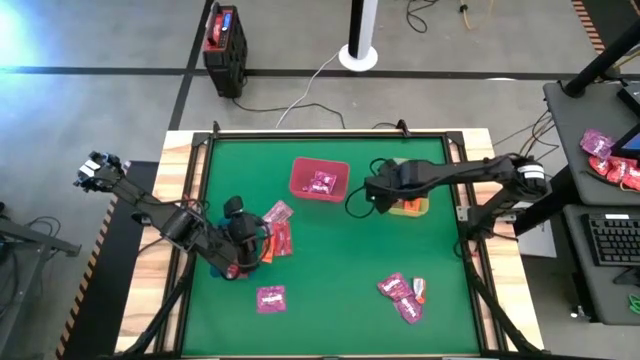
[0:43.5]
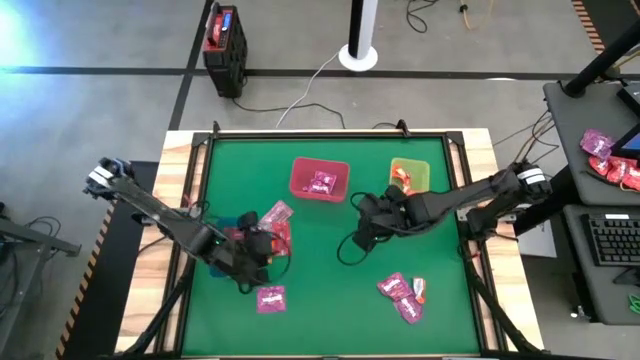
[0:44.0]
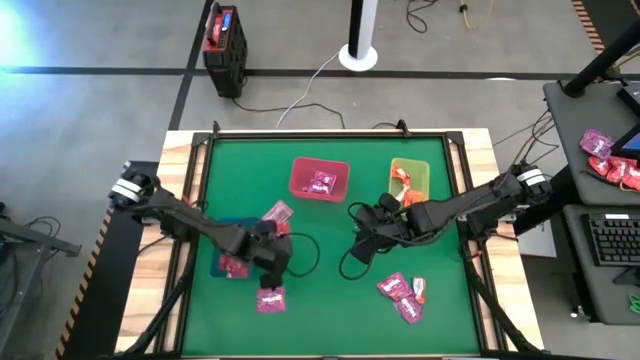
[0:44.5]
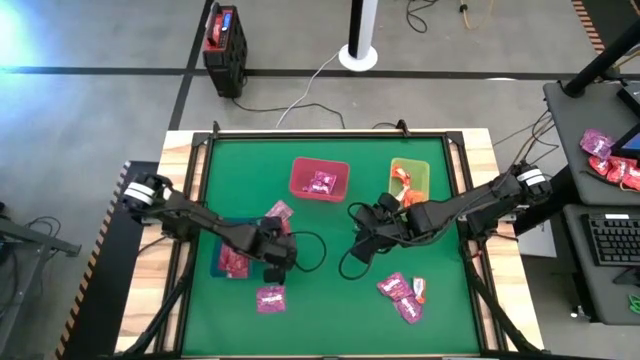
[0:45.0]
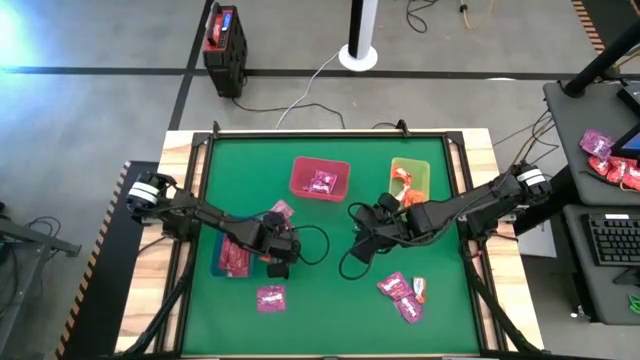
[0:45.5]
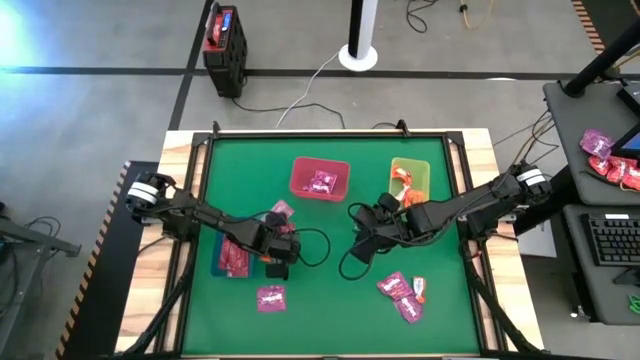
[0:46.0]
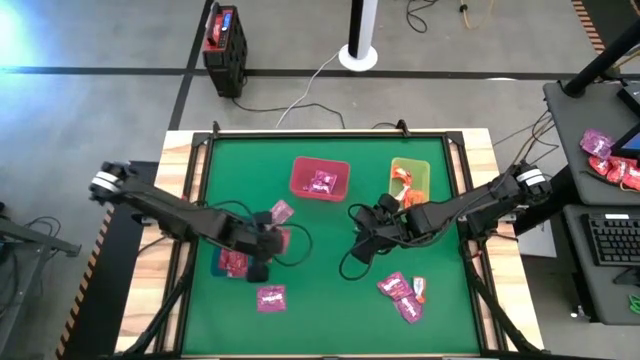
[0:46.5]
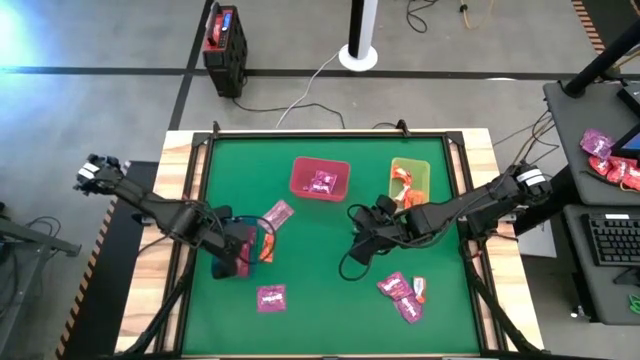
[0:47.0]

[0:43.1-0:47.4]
Task: Sort candy by brand, put in halloween buckets
Put the red candy into the blue bin

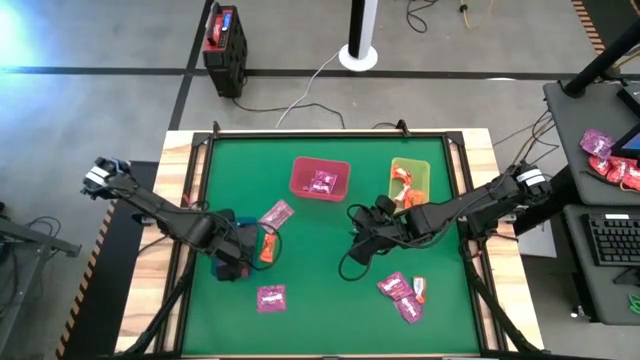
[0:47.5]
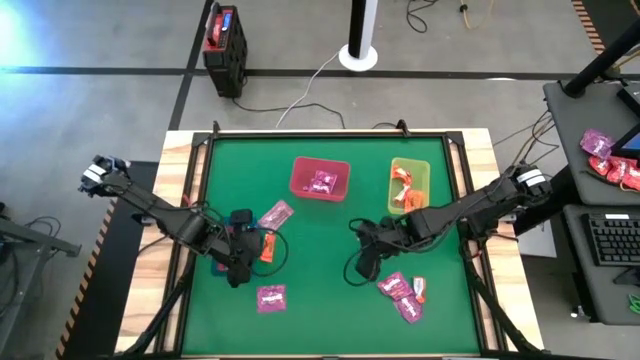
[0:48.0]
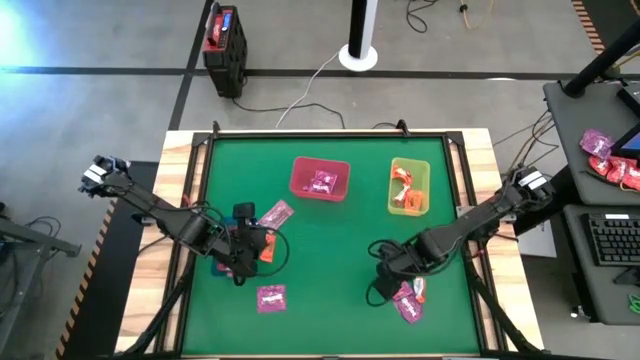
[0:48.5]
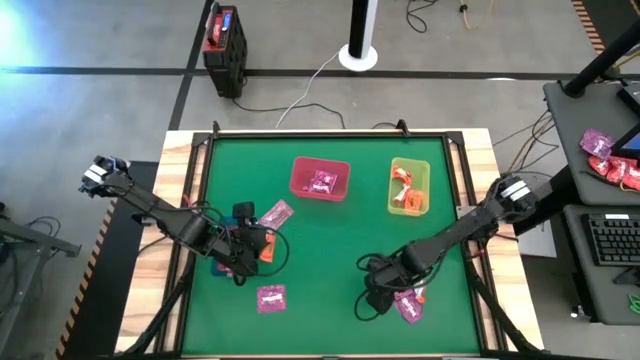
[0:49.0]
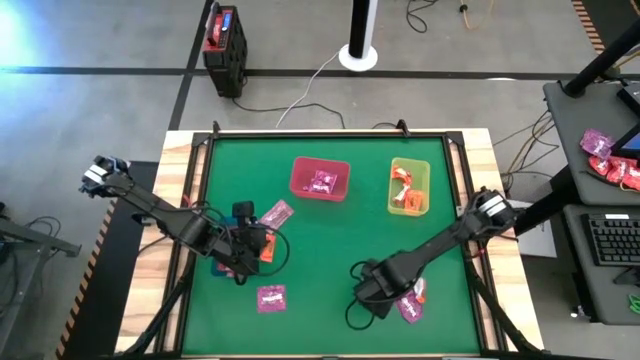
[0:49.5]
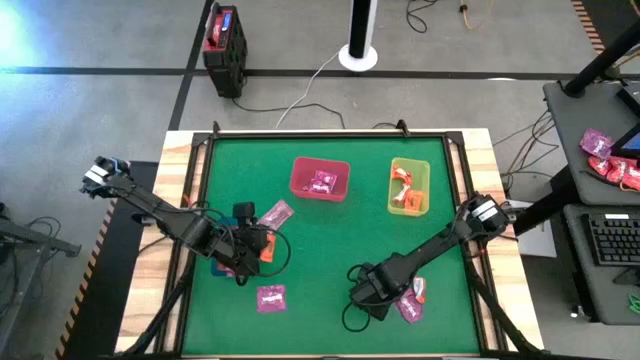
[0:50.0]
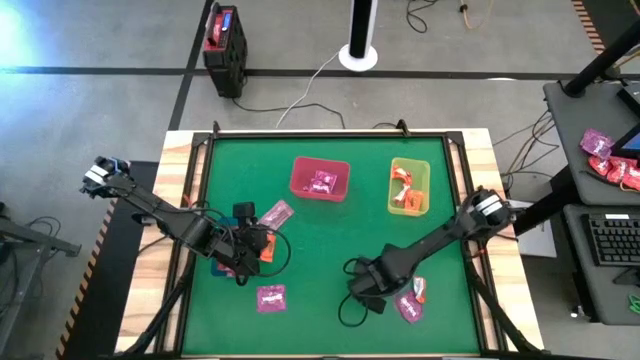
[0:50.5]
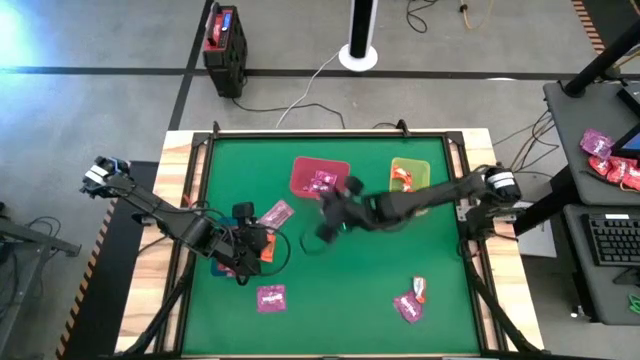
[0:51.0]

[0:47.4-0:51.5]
Put the violet candy into the red bin

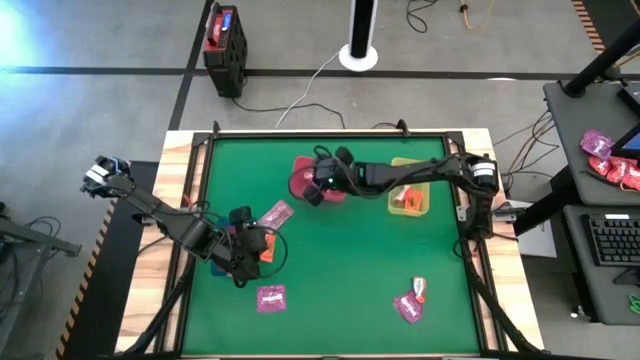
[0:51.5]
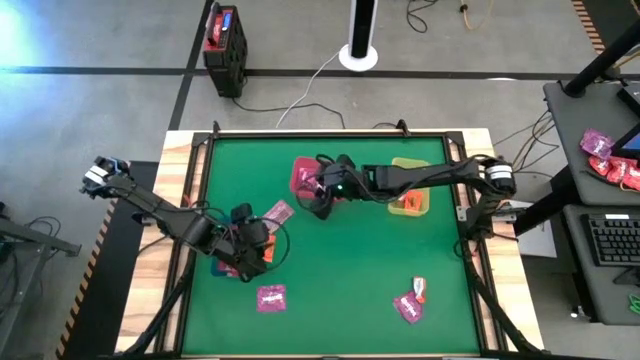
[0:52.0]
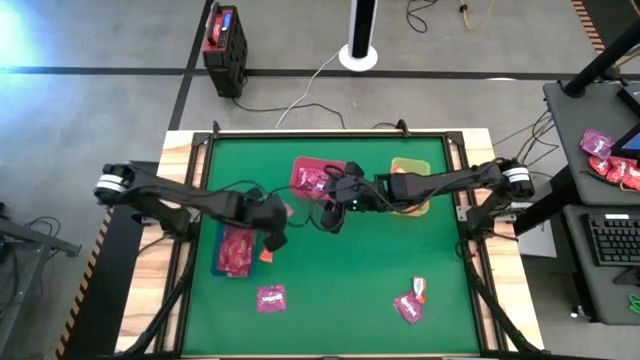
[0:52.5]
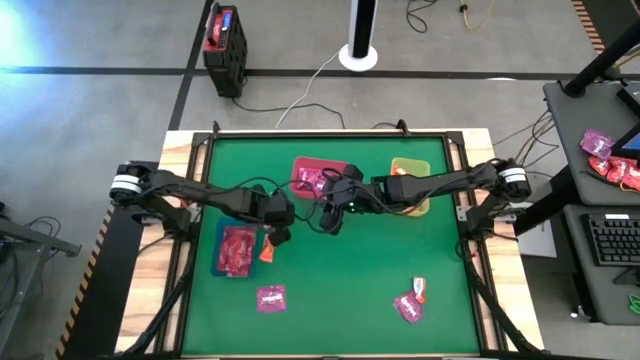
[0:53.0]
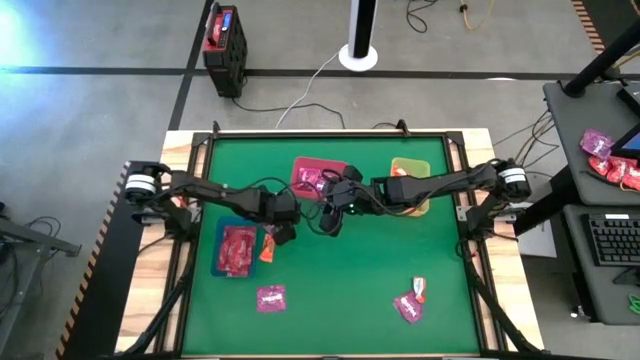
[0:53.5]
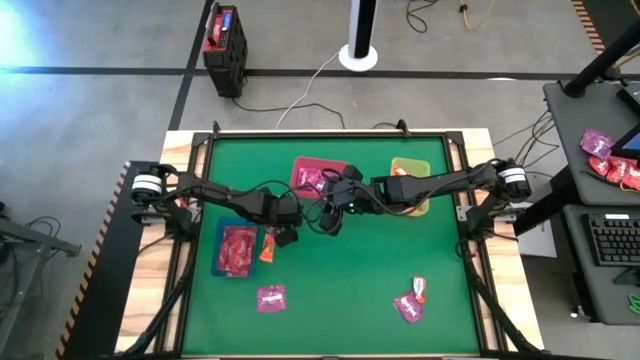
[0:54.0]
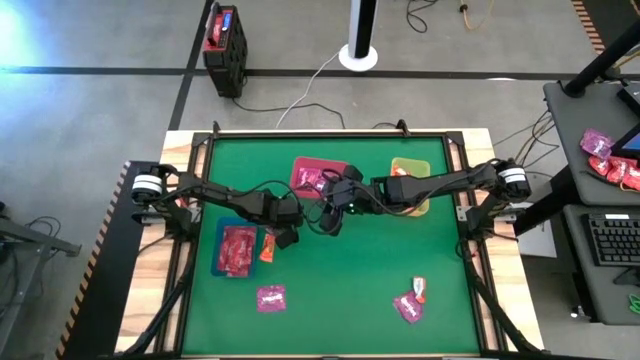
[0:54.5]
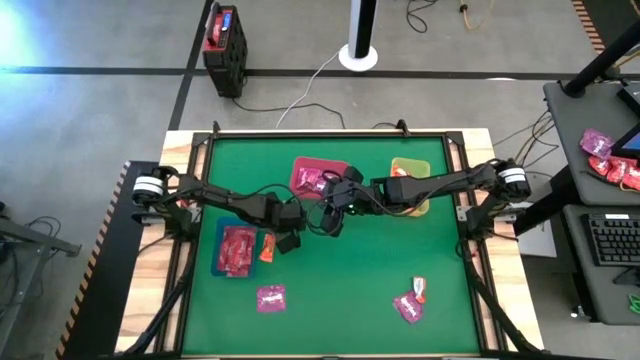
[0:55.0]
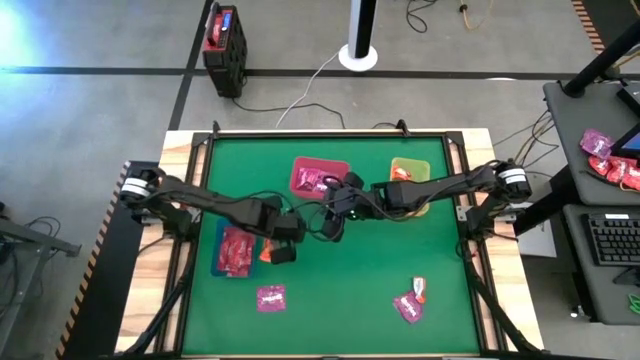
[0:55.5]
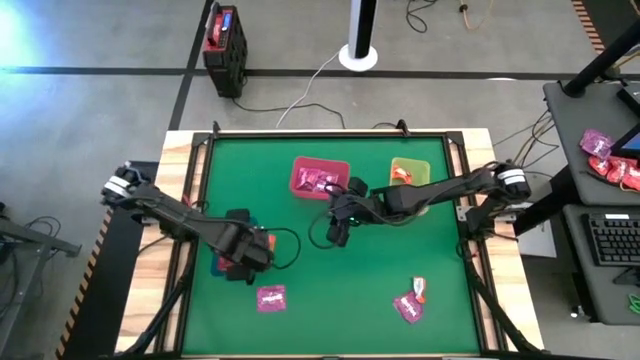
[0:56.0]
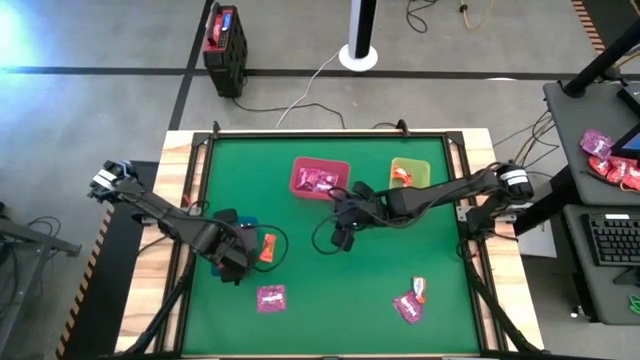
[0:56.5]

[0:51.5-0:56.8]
Put the red candy into the blue bin

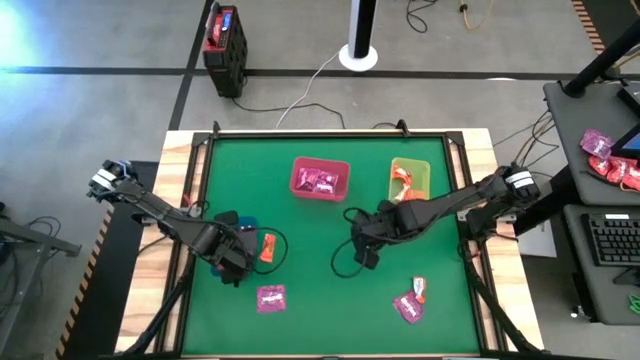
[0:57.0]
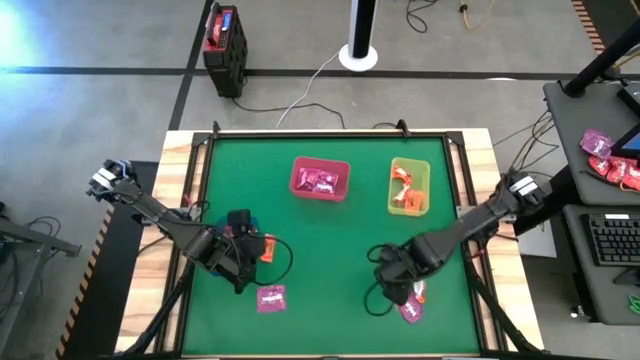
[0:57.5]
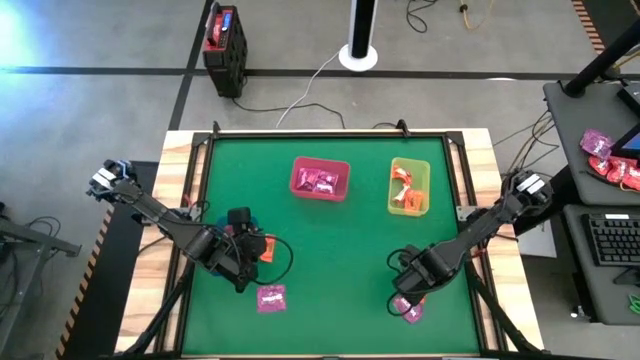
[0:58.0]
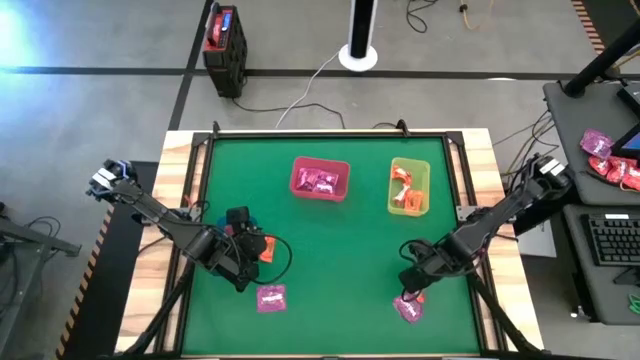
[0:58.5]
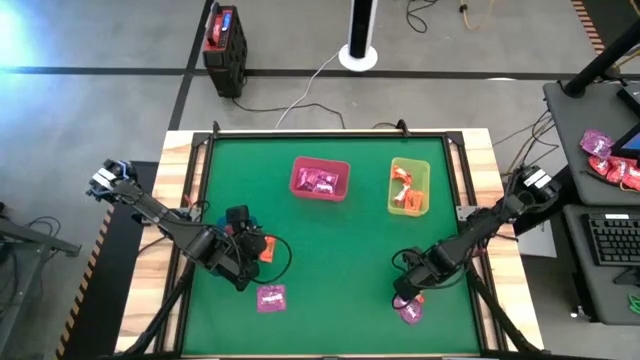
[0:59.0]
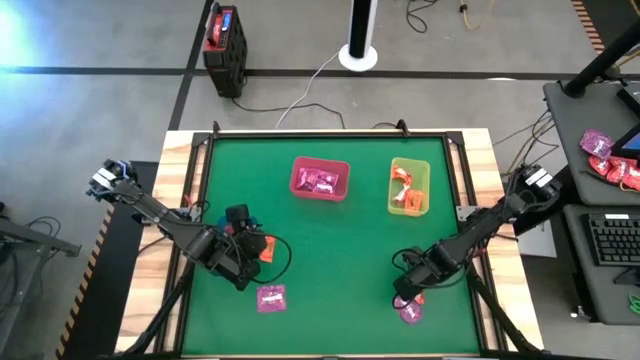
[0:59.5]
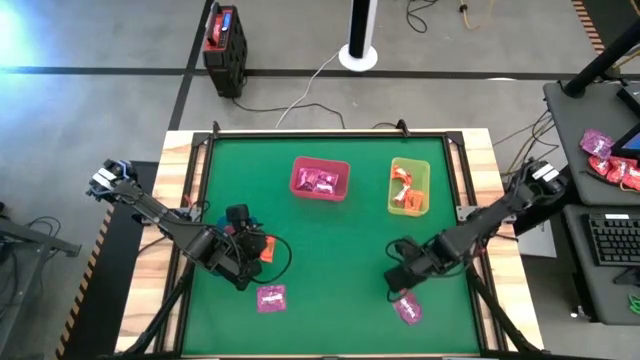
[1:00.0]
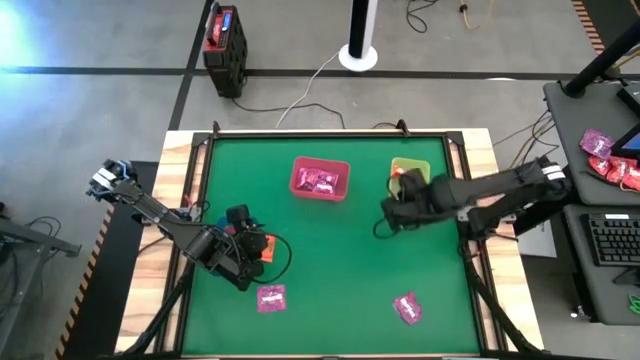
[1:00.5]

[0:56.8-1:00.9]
Put the orange chocolate into the yellow bin

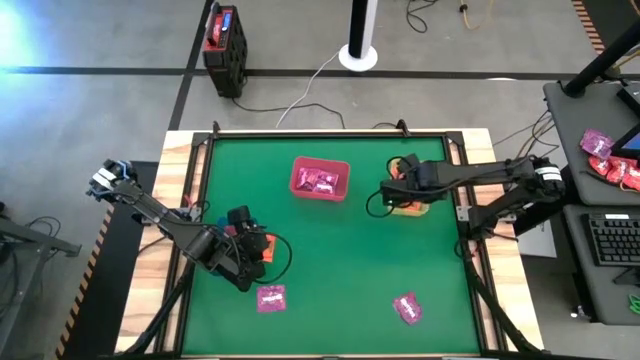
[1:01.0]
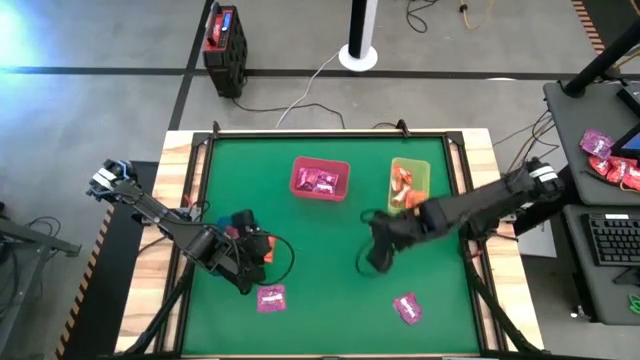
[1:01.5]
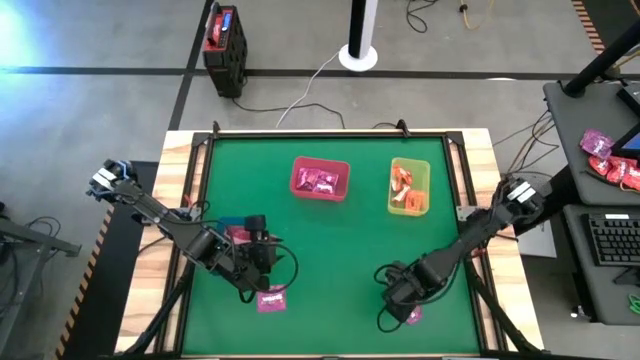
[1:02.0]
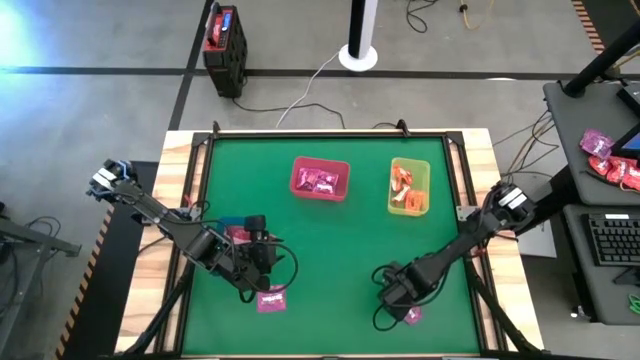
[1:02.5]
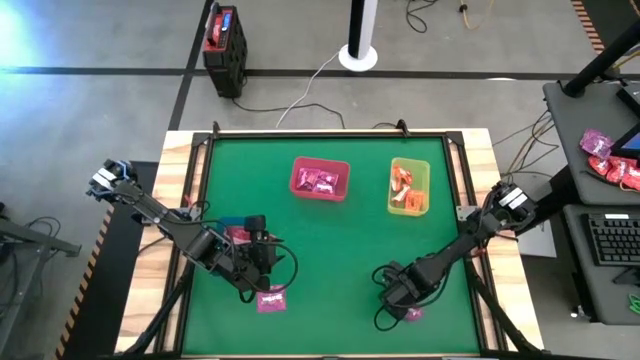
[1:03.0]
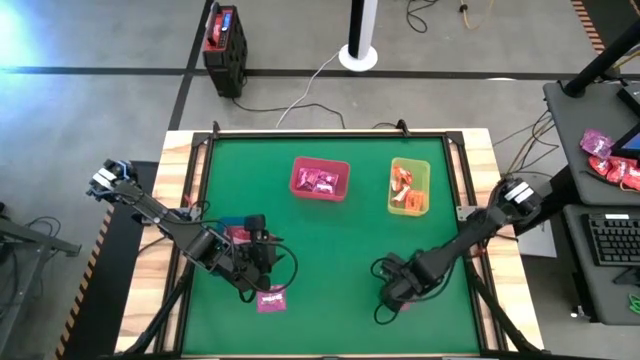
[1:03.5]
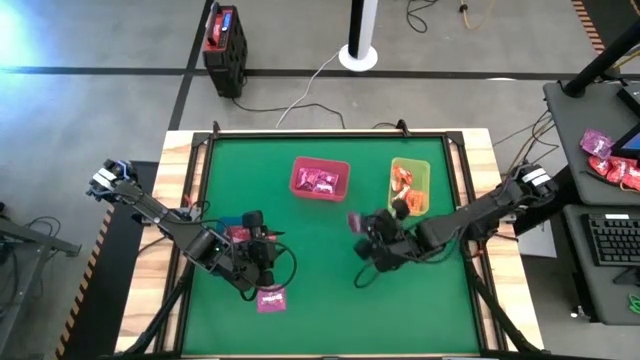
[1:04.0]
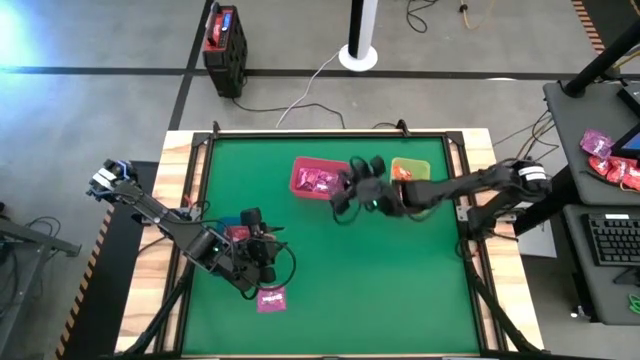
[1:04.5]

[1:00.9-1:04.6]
Put the violet candy into the red bin
